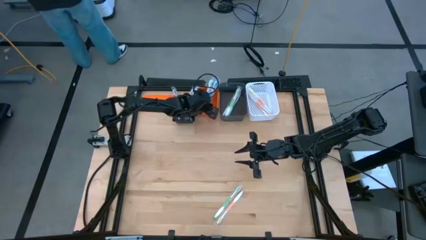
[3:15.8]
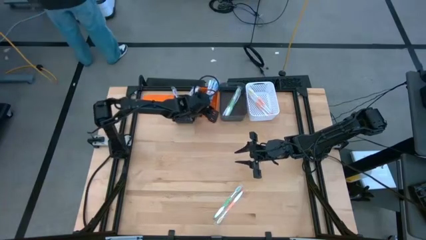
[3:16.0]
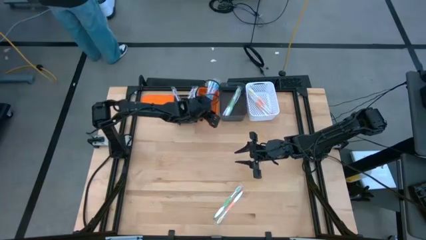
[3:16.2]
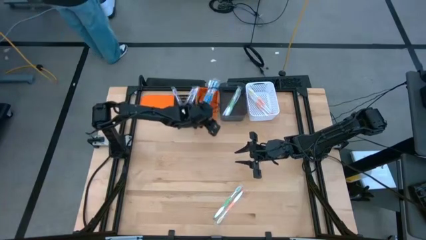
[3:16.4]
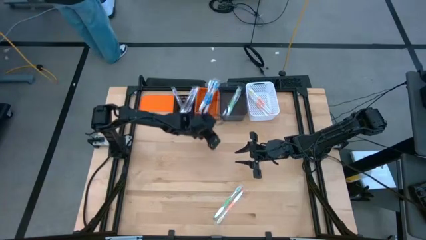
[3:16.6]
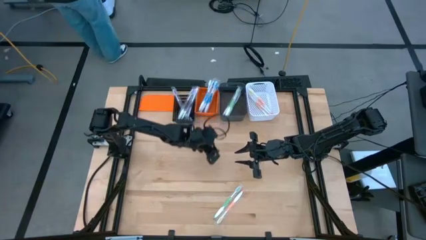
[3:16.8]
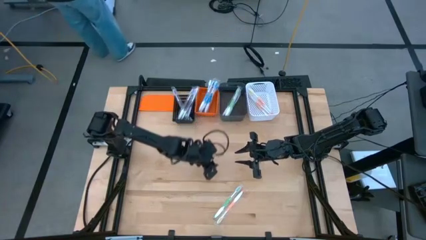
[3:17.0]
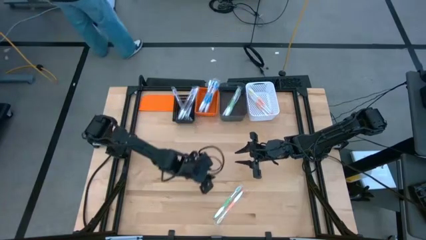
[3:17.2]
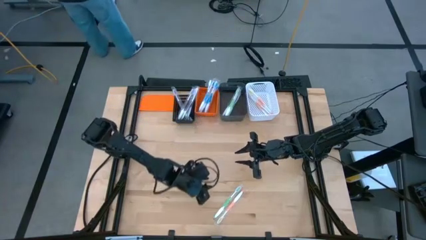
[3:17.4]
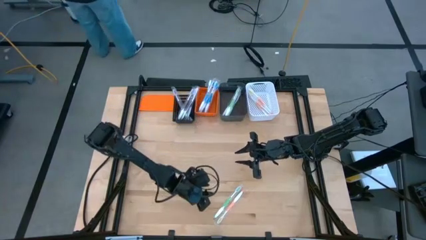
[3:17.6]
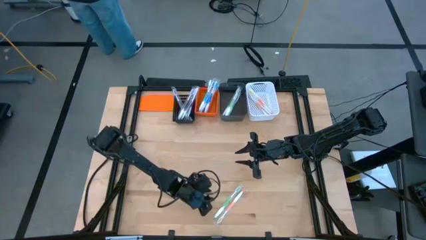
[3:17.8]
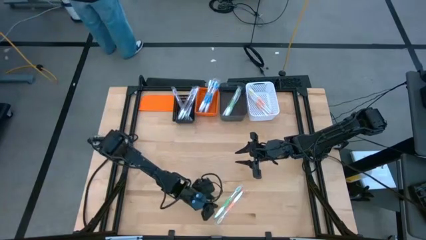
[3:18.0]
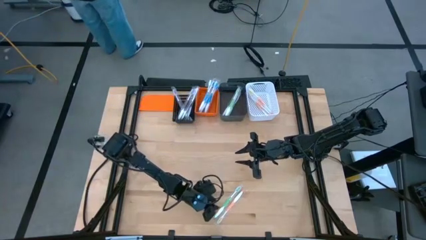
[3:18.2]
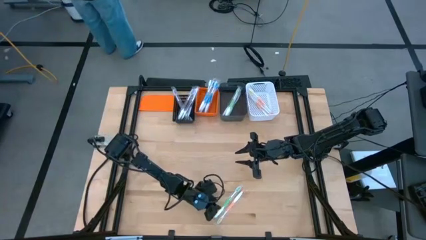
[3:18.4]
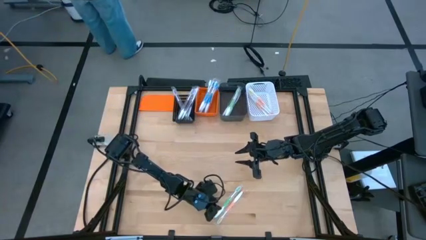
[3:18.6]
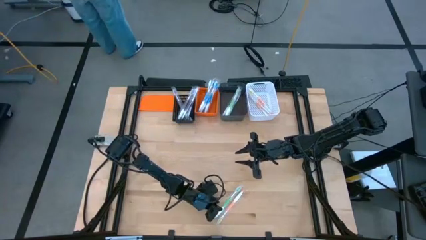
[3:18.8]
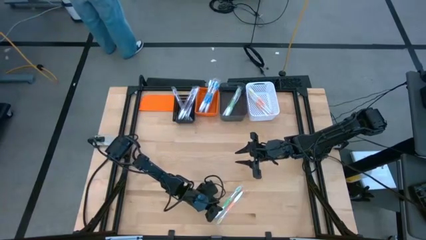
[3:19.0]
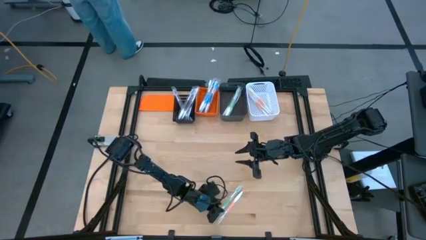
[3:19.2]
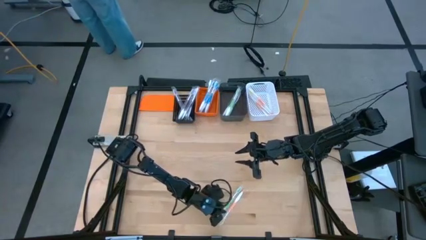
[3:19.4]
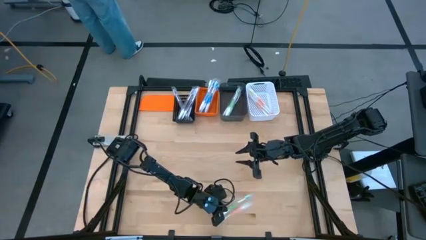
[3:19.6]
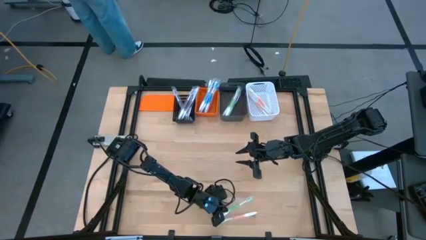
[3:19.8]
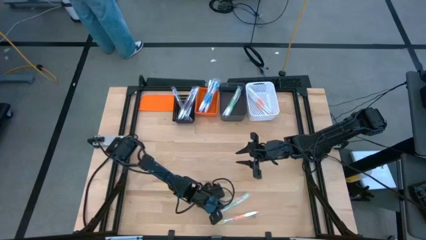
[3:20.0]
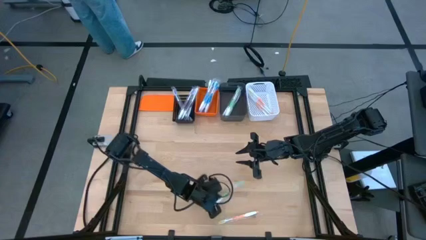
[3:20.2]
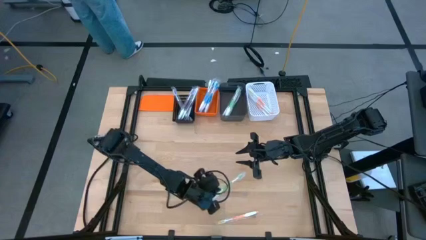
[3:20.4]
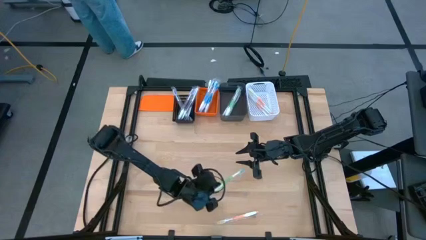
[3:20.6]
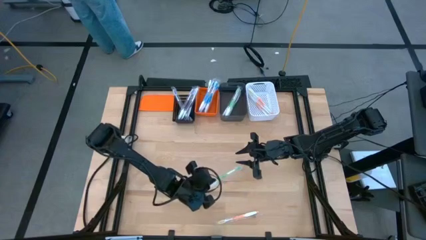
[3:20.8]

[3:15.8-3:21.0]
Task: Pick & Place Toothbrushes
Put the green toothbrush into the black bin

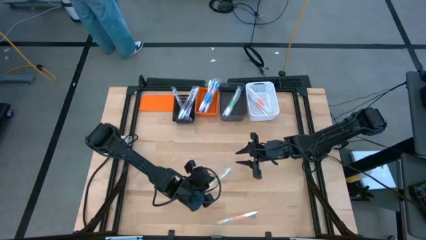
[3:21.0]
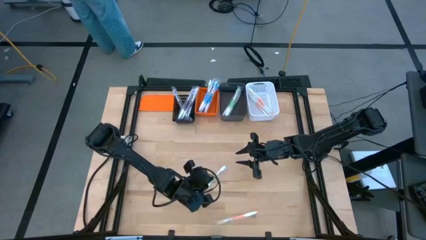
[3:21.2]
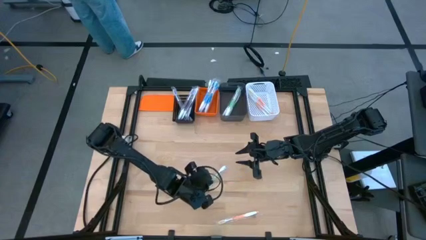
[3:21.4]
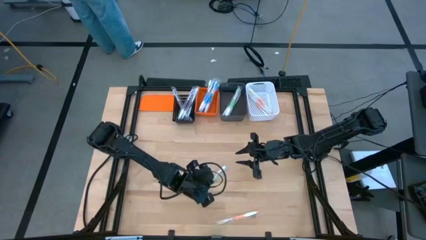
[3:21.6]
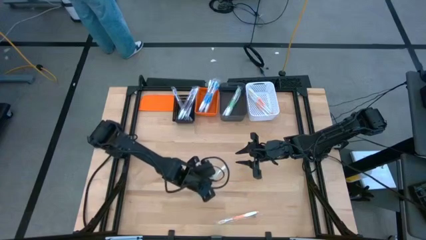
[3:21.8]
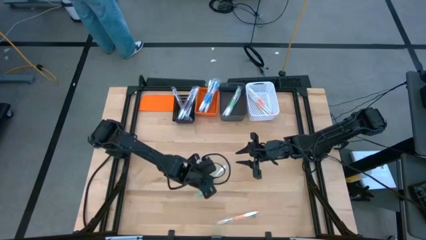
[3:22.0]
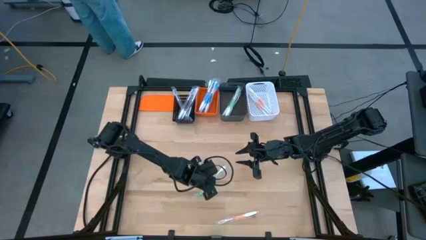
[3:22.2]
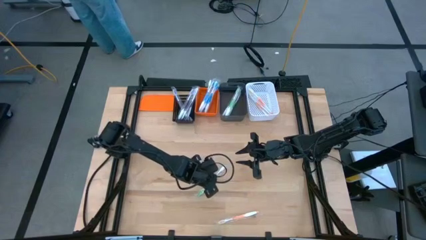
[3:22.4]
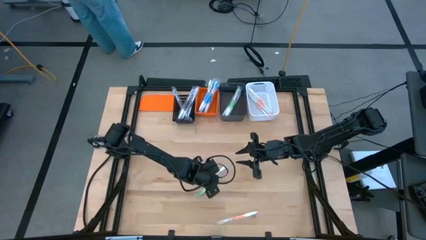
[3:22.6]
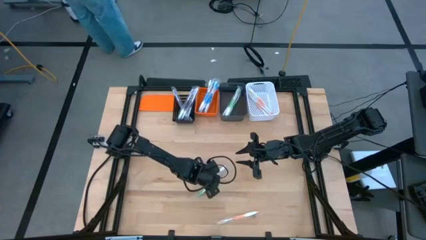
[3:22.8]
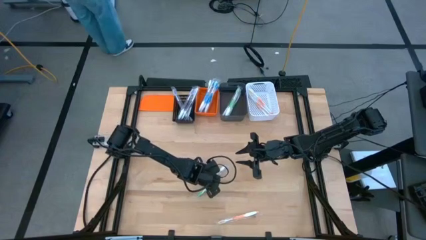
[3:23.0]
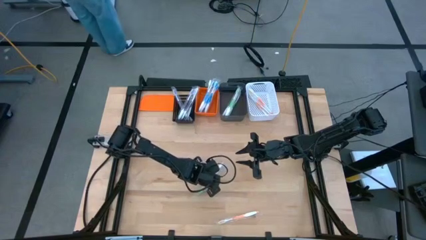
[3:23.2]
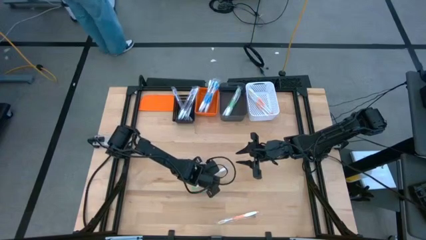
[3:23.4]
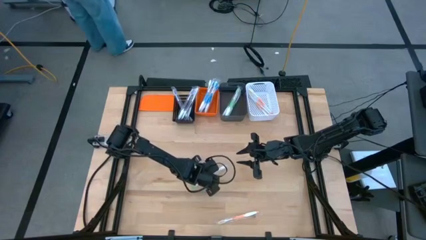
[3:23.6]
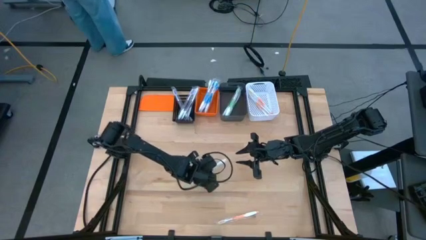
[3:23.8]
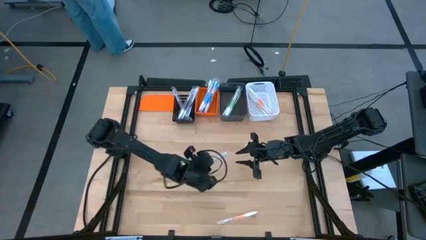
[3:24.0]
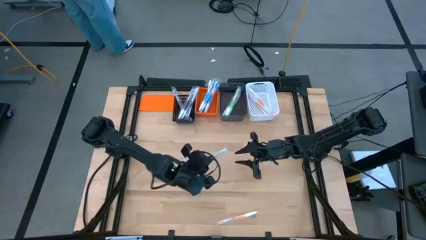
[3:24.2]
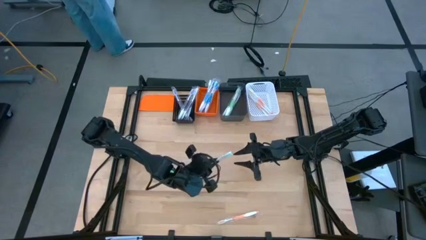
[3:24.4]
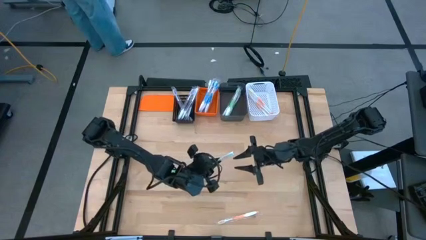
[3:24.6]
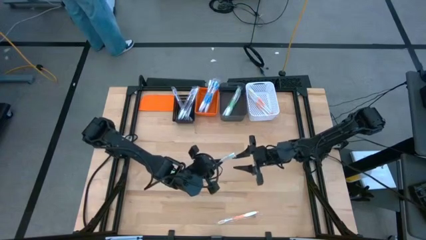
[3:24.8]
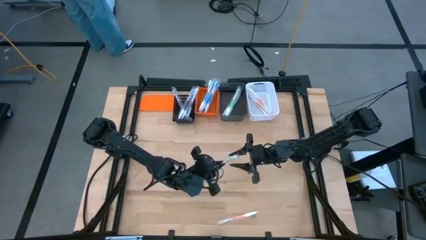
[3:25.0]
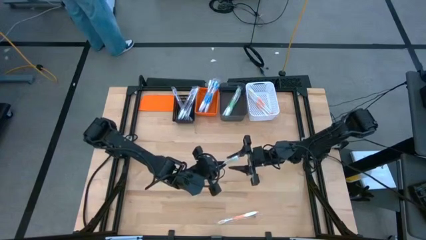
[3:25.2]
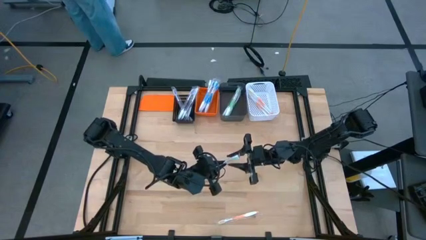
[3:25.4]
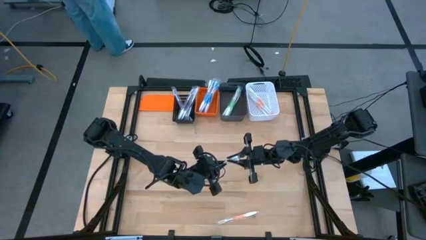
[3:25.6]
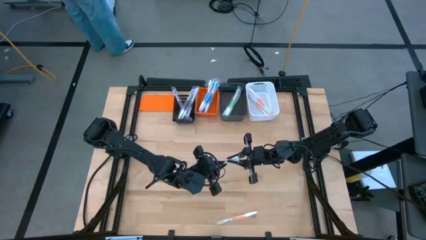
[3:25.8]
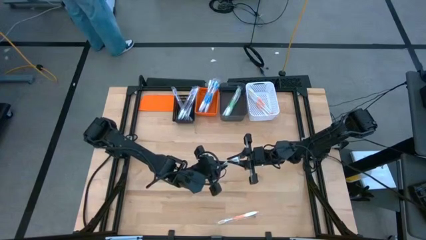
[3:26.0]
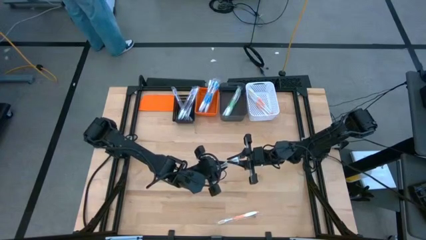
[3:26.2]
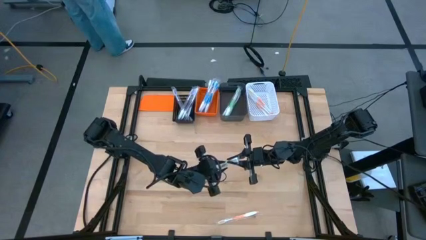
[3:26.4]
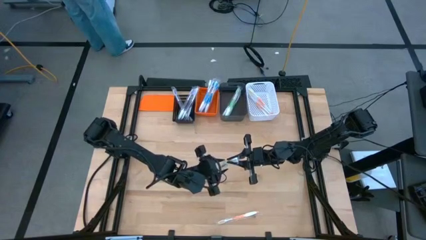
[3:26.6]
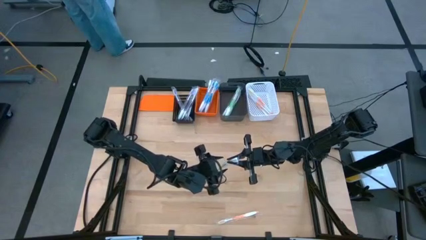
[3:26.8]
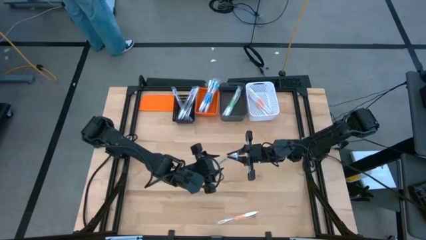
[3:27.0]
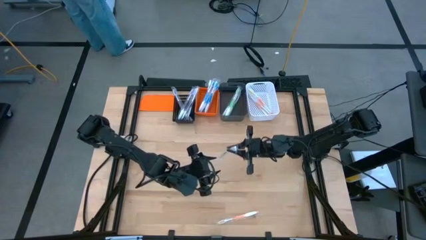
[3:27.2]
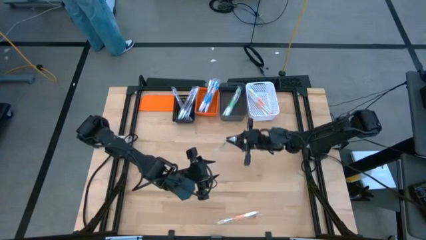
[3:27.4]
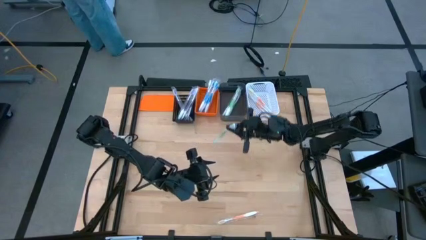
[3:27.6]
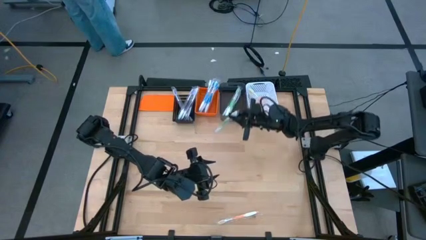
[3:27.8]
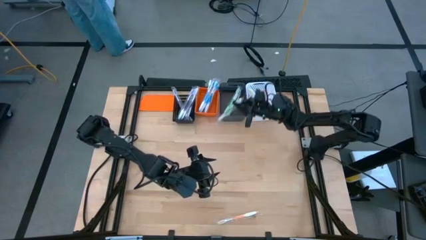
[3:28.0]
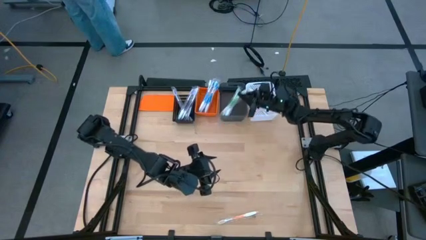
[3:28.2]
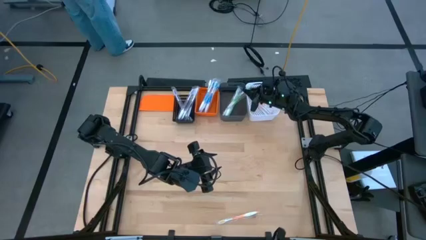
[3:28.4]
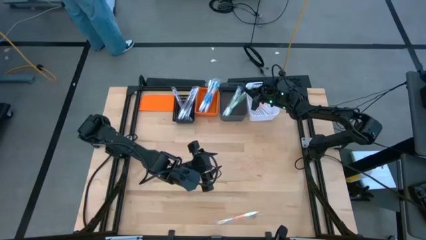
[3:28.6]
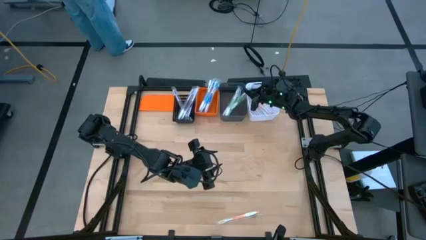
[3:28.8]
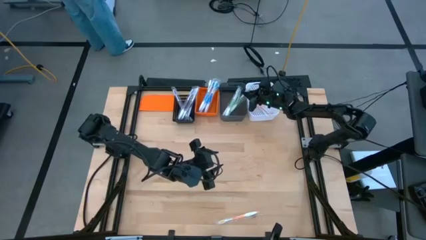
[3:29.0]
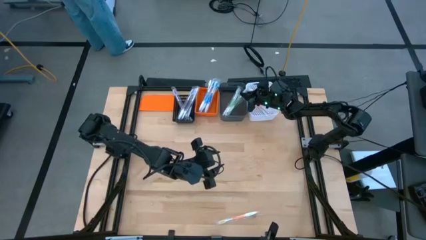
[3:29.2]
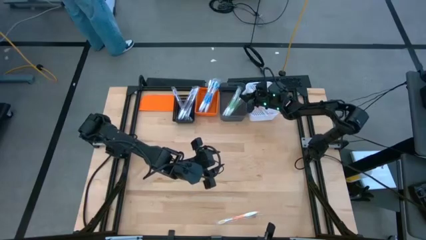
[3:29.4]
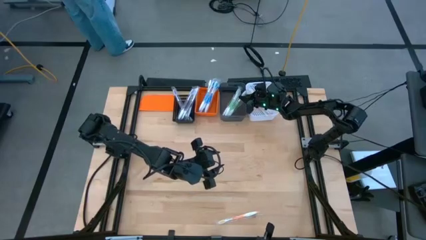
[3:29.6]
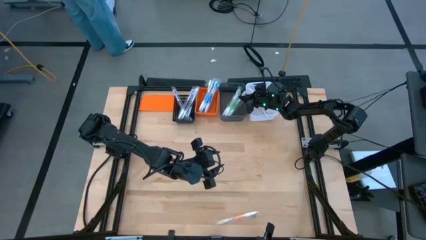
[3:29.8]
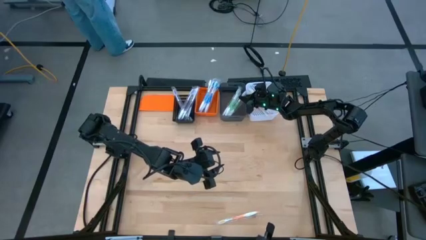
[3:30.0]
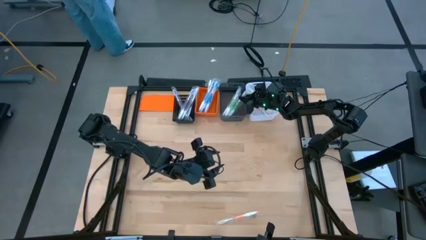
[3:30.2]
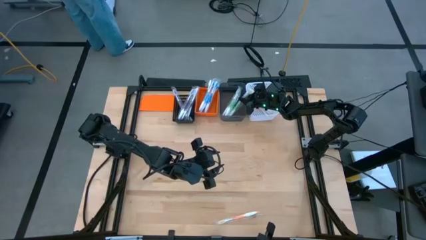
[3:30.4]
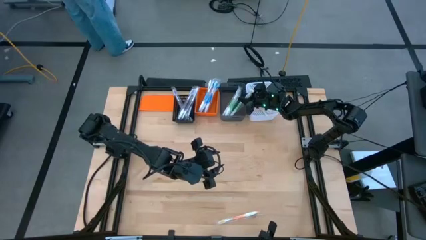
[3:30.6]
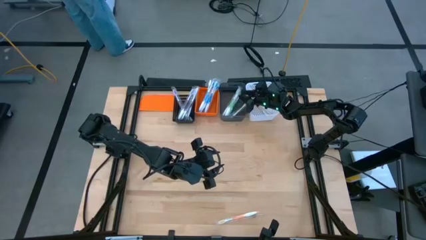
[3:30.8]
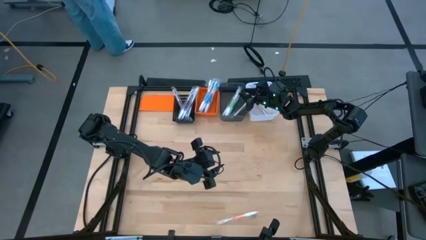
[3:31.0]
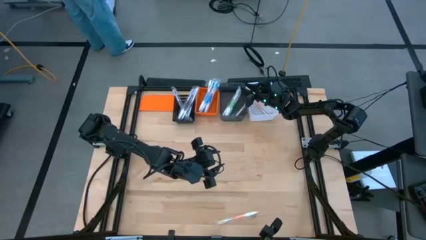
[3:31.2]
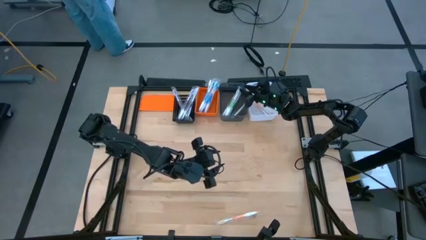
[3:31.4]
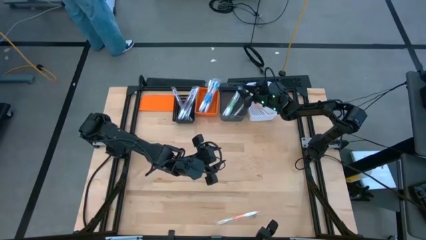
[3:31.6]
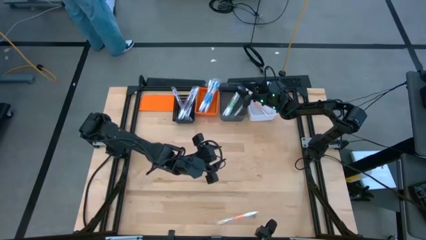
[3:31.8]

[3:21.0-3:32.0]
Put the green toothbrush into the black bin

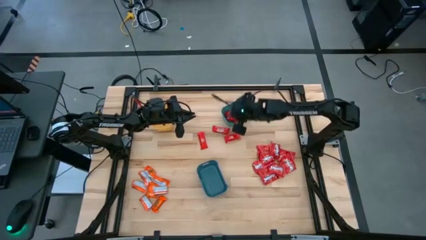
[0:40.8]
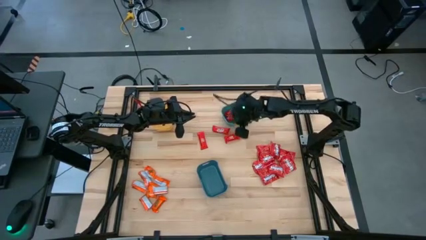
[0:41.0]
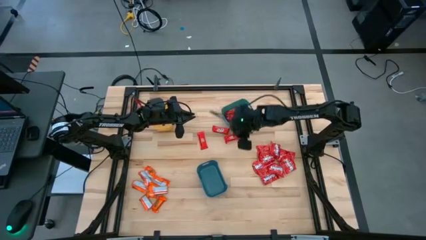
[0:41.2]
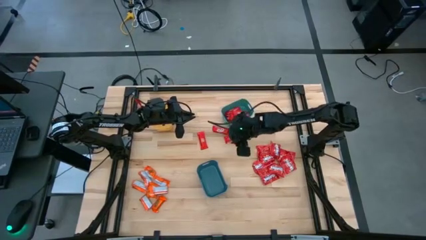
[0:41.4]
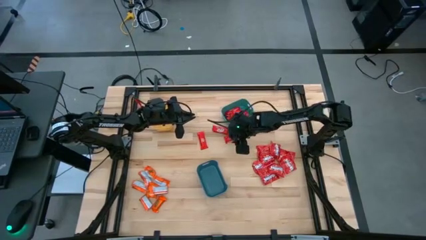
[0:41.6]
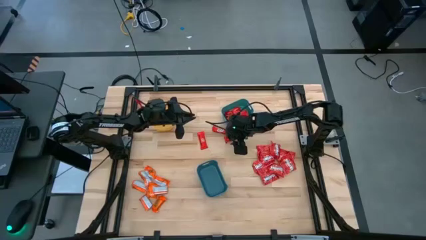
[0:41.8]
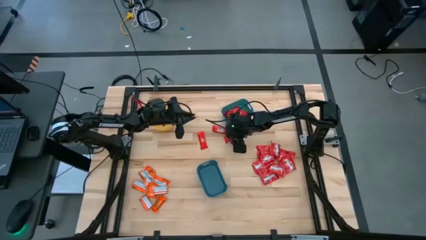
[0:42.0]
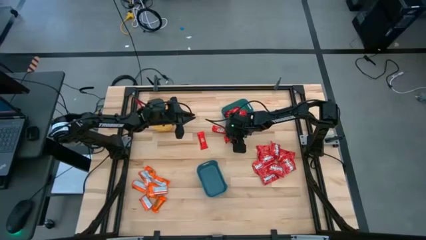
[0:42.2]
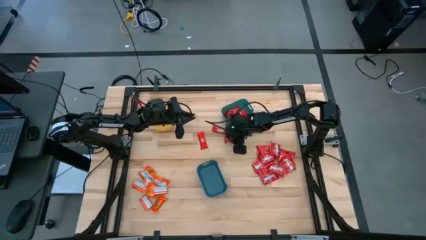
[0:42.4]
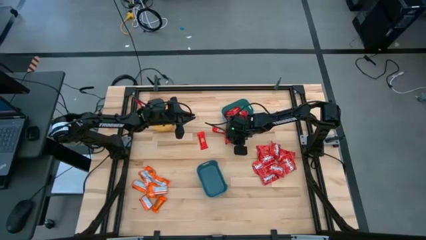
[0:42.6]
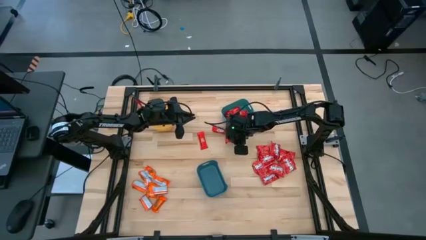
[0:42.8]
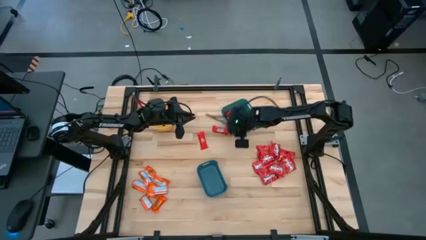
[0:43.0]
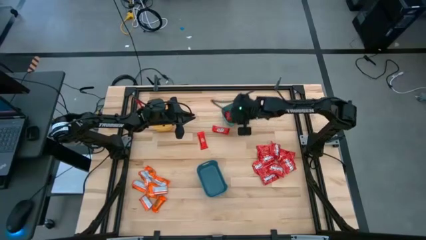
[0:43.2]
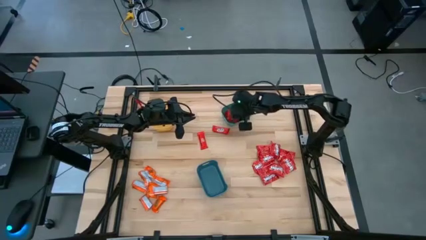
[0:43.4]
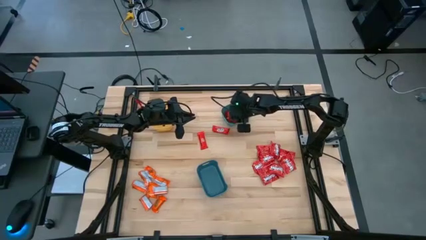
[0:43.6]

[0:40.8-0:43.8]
Task: Sort candy
Put the red chocolate bar into the green bin
